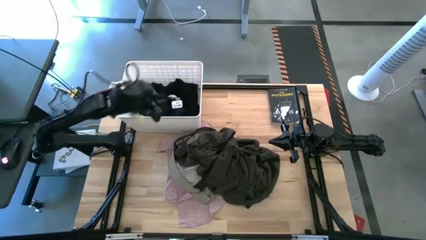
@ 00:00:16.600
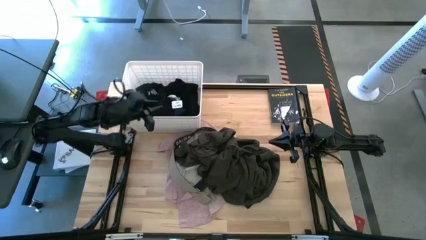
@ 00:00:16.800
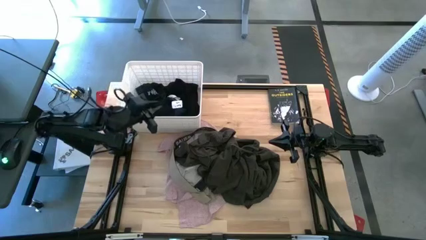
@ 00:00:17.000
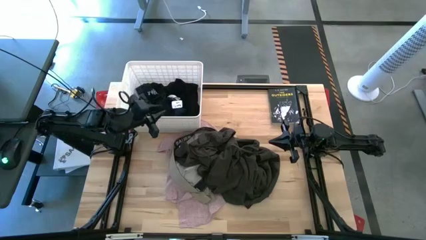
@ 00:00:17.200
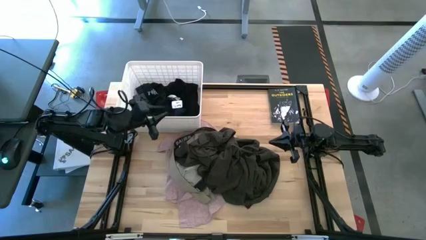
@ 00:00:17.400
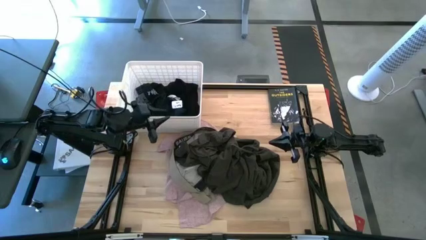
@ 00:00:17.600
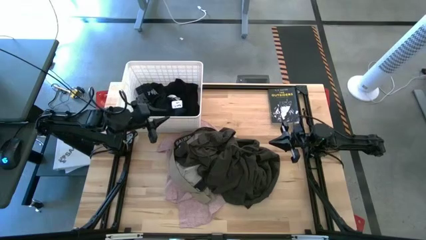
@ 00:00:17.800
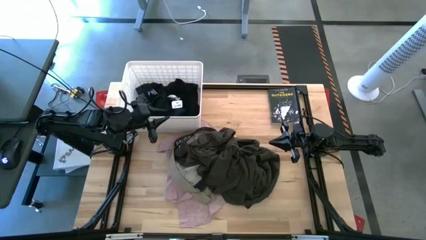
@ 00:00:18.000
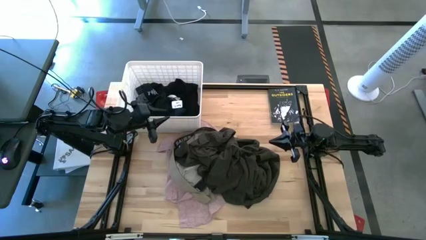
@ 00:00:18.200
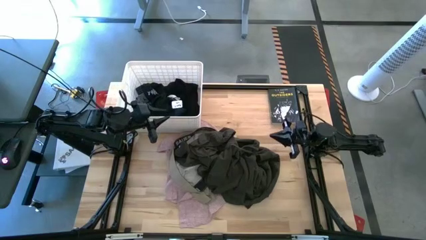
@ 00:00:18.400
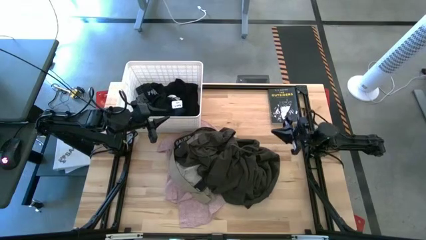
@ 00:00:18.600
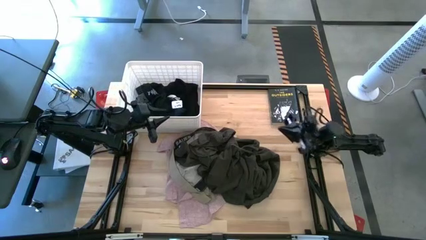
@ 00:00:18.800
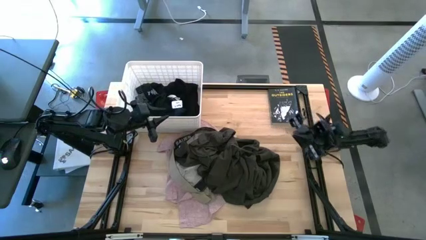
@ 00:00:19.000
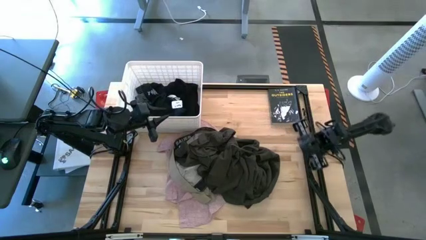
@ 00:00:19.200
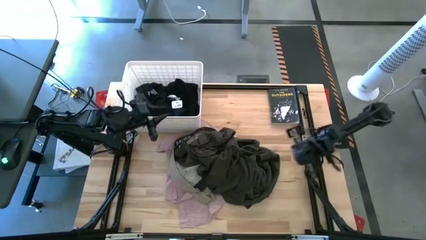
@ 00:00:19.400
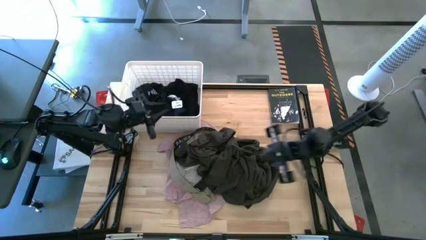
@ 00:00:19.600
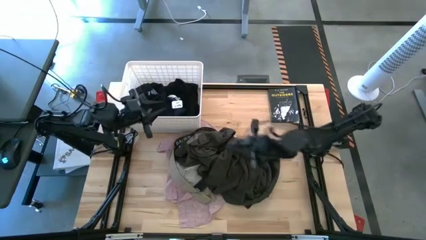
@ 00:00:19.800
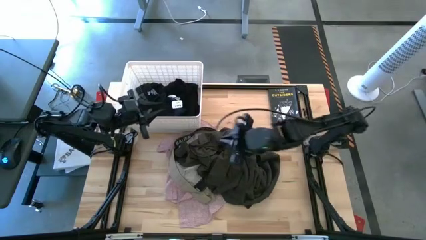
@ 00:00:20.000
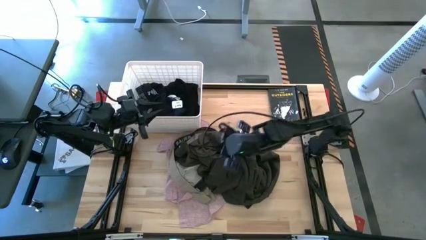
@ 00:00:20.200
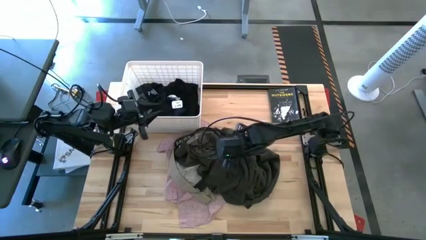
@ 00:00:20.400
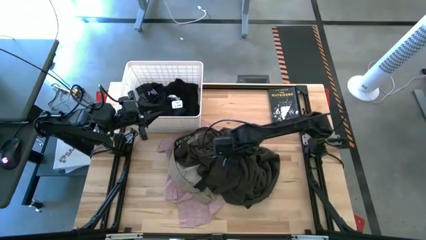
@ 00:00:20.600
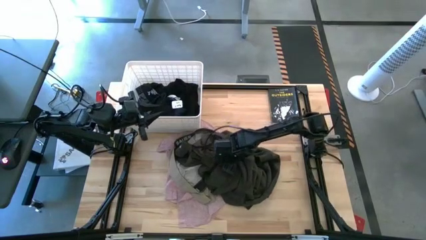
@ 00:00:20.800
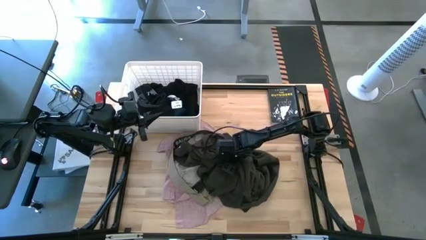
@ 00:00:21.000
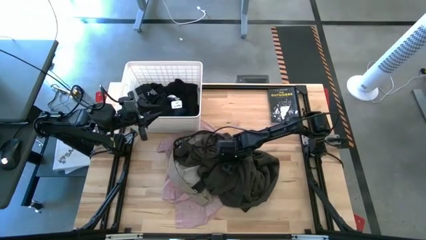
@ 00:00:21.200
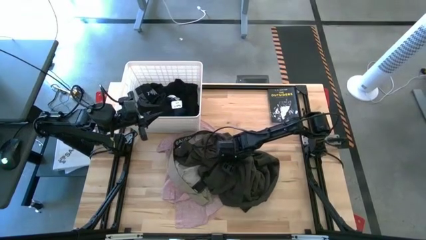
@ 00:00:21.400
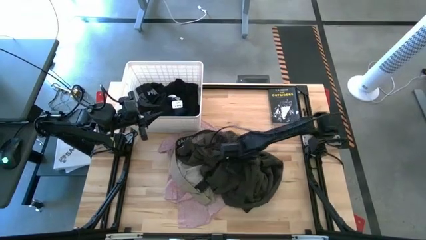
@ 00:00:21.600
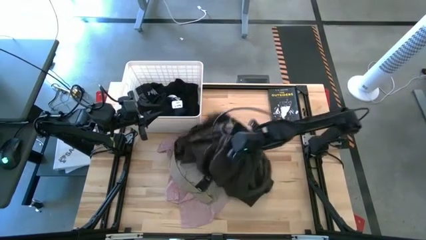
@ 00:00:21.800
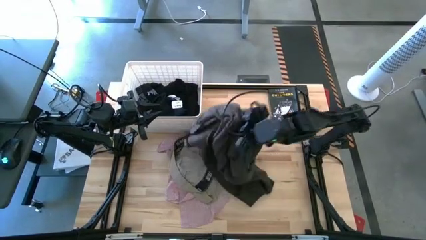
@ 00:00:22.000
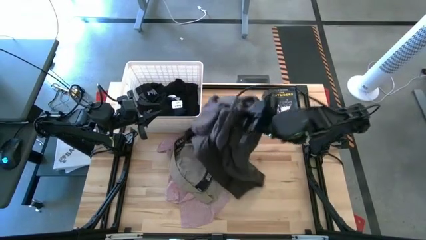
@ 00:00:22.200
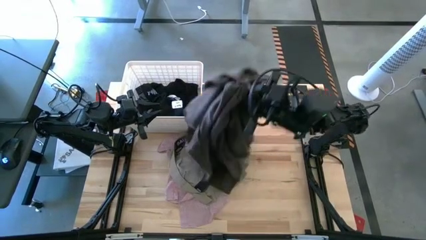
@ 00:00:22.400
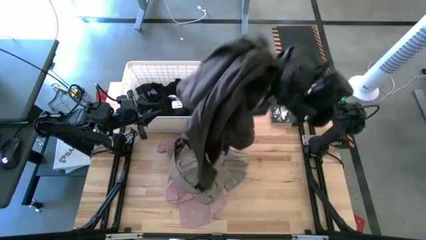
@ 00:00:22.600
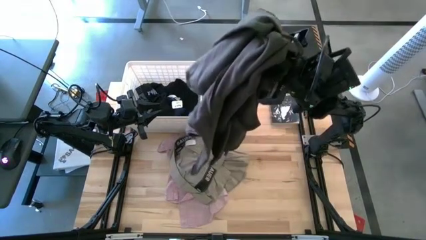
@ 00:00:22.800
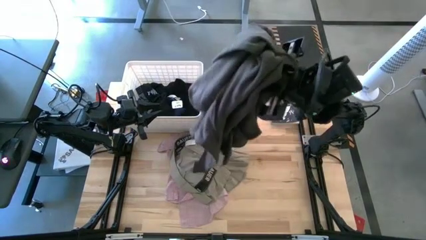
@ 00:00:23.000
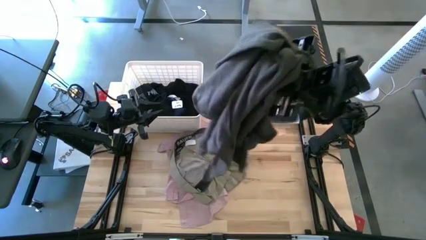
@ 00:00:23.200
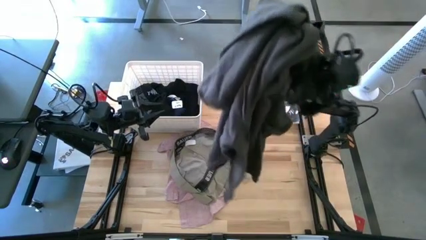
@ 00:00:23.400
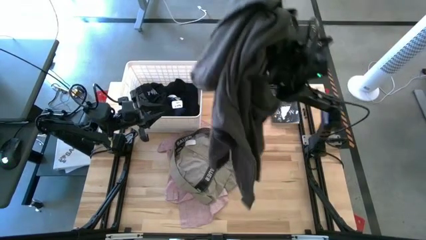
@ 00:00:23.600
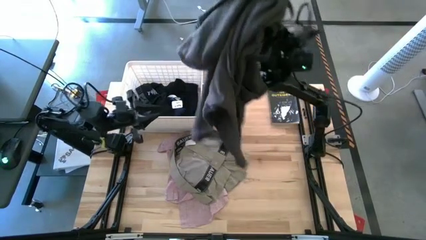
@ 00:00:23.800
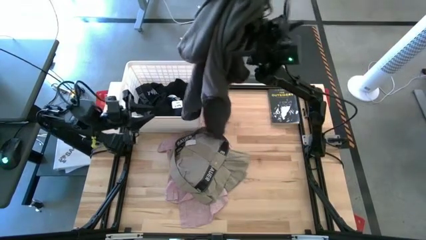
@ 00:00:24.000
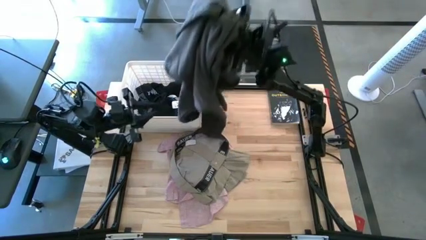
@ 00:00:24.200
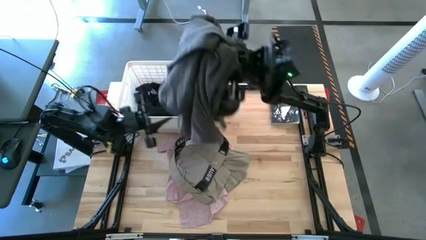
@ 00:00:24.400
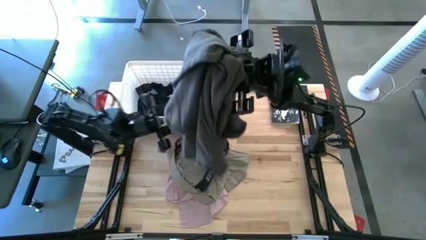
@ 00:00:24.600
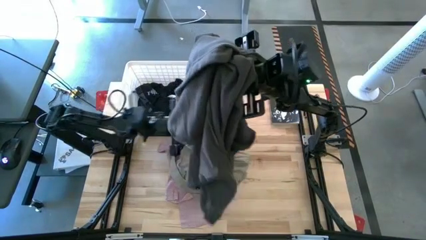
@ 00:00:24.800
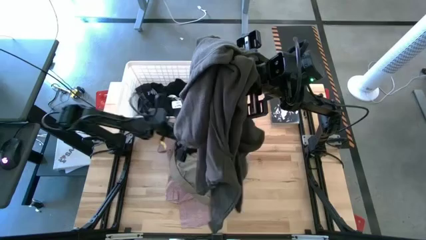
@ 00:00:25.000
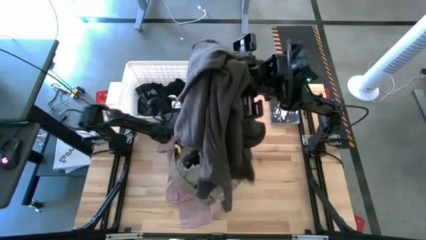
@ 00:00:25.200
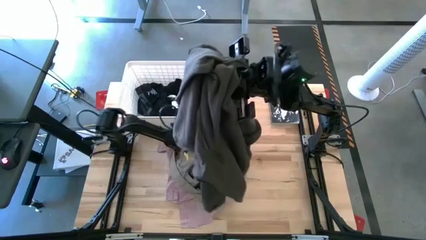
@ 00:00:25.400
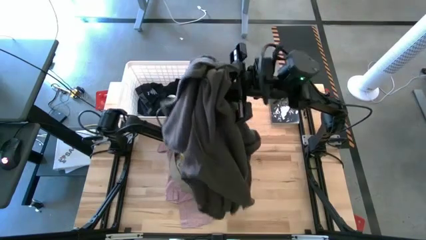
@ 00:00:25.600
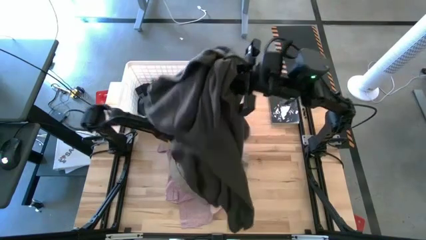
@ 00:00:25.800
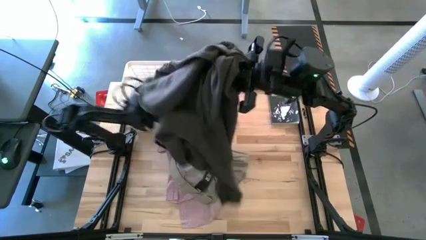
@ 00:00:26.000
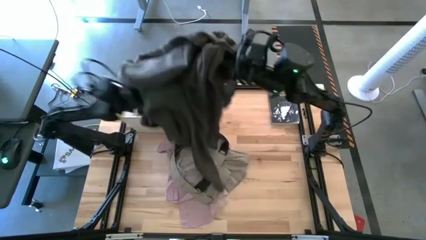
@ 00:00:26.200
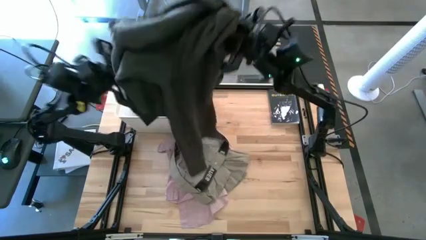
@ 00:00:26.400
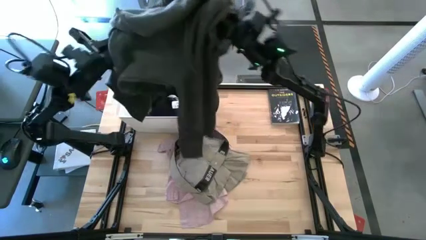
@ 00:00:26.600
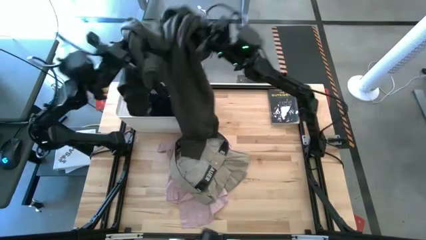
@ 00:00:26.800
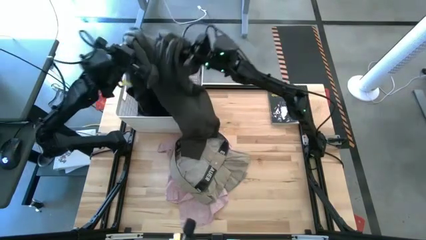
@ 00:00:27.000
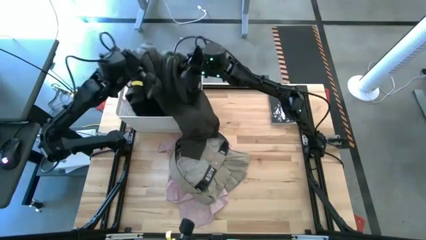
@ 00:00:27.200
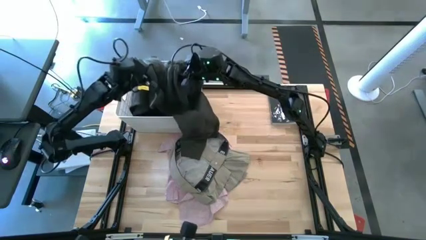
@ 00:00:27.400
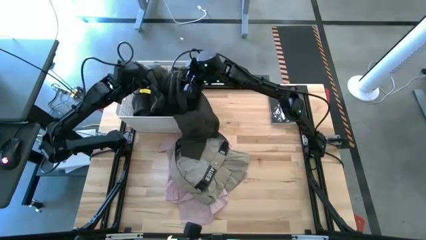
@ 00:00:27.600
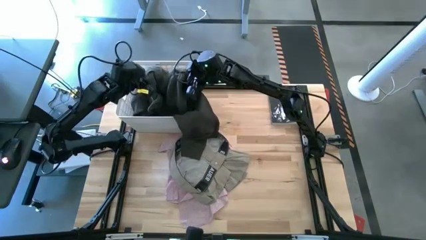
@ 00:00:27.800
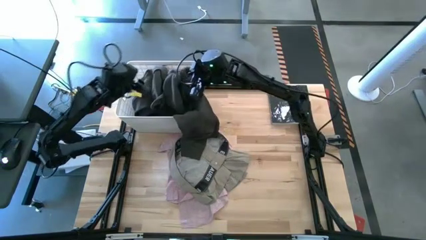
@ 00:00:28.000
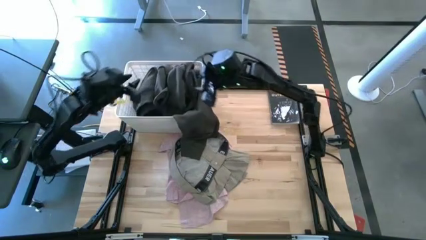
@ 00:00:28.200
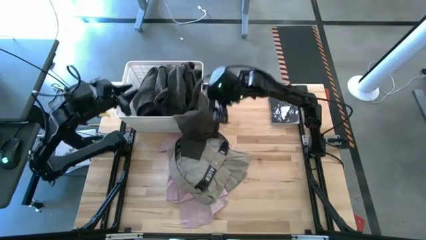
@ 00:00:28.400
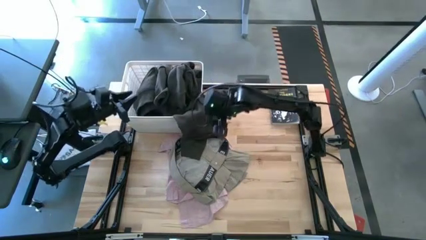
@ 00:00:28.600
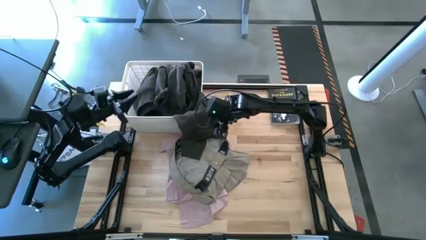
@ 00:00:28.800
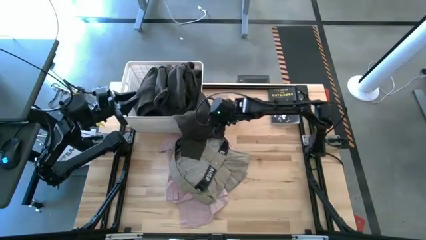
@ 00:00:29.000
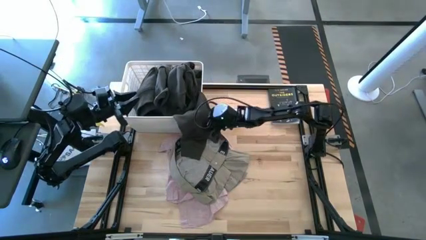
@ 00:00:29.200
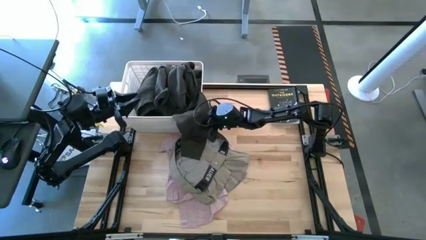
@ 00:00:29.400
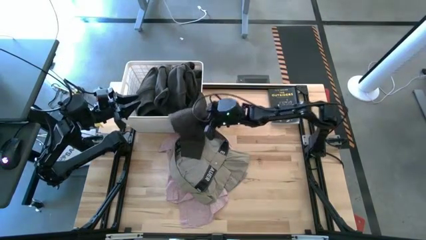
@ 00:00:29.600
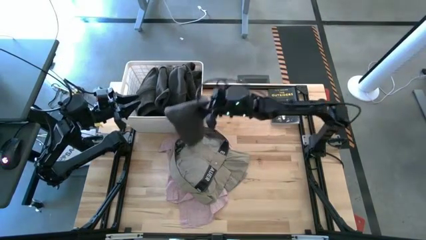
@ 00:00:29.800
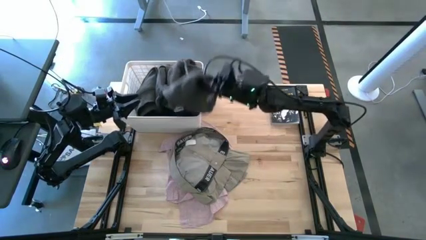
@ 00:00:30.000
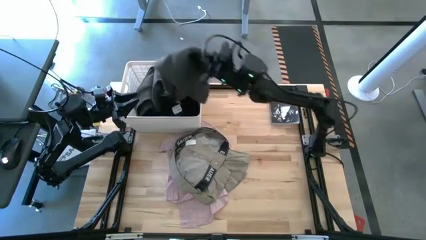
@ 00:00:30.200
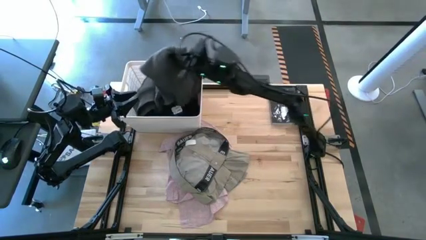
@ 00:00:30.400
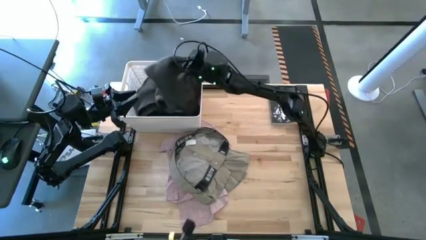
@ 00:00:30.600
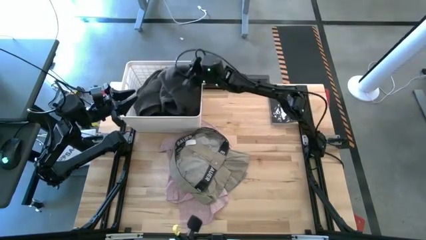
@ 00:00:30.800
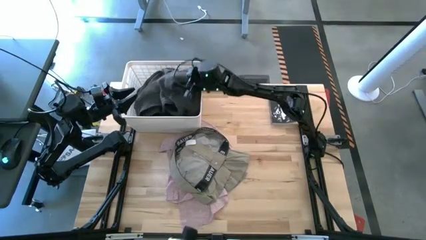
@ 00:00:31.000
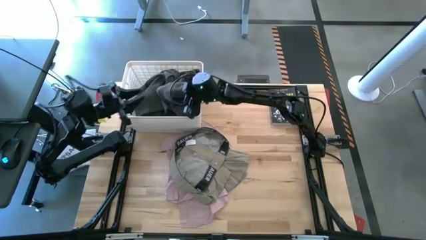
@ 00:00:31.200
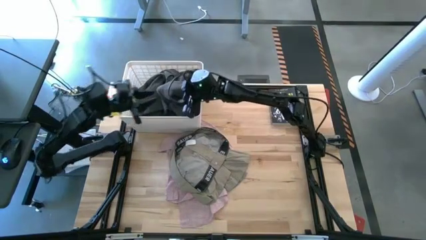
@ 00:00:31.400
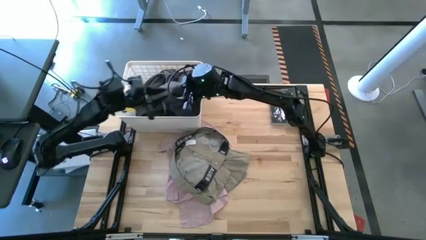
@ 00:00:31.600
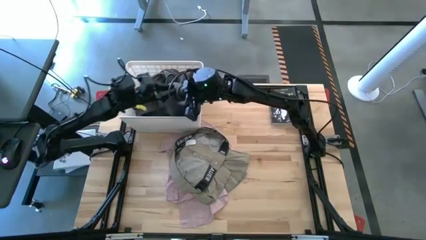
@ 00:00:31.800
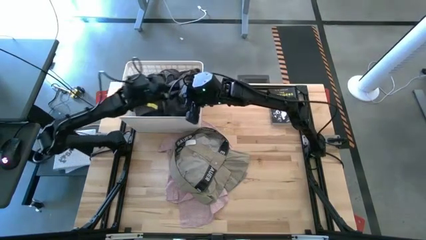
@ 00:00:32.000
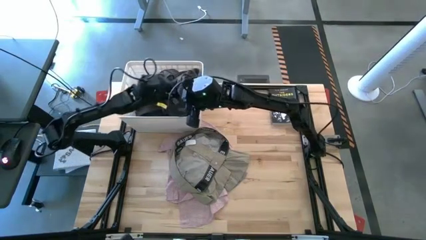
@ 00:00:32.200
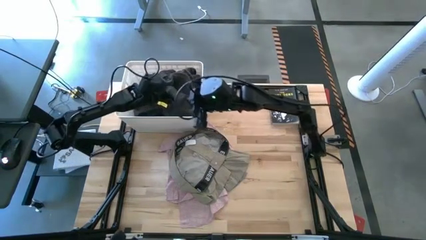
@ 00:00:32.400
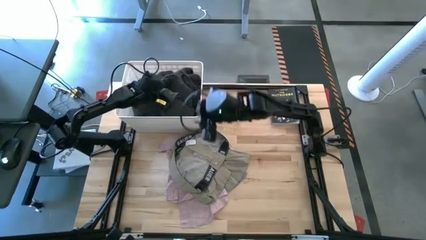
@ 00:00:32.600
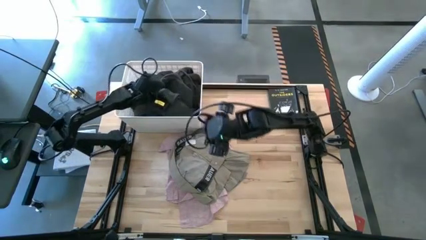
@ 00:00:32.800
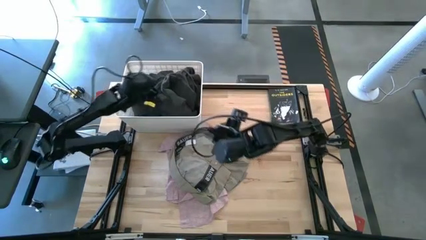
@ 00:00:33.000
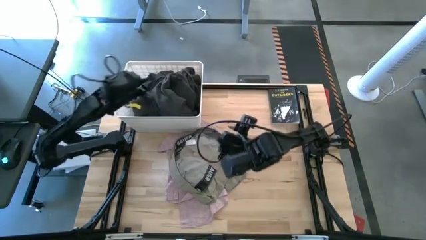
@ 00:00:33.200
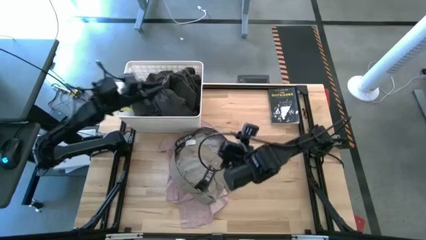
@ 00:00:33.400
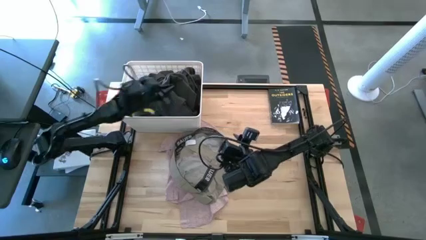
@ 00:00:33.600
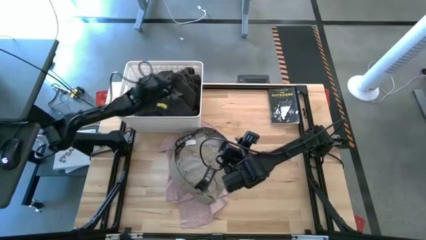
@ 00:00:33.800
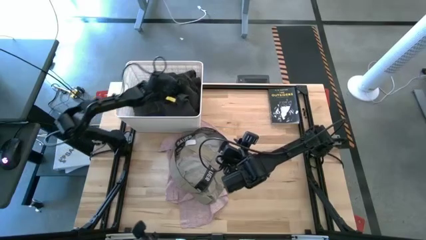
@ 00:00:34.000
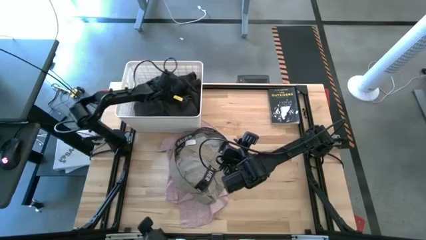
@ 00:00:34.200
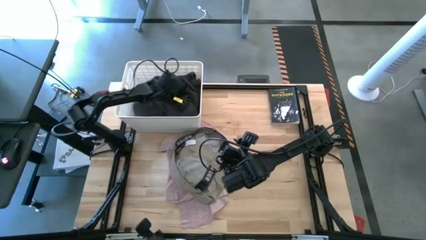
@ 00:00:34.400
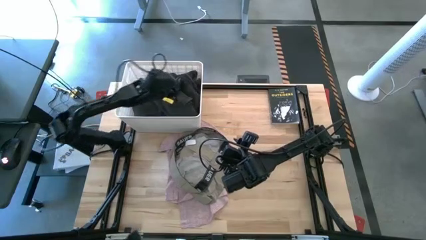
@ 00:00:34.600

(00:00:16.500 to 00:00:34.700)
Task: Sort clothes
Put the gray hoodie into the white laundry bin
